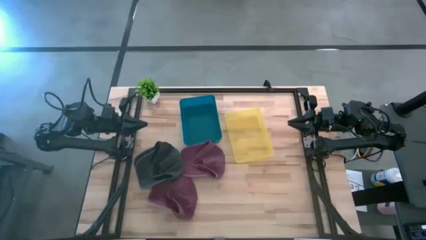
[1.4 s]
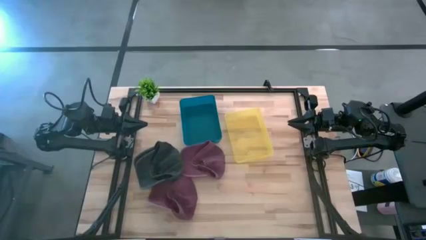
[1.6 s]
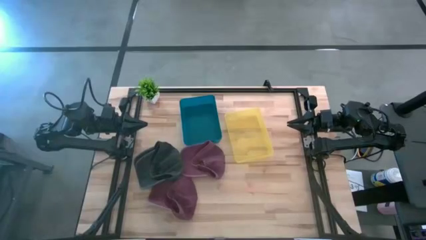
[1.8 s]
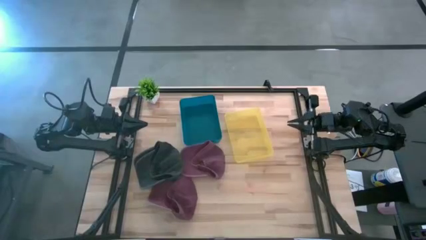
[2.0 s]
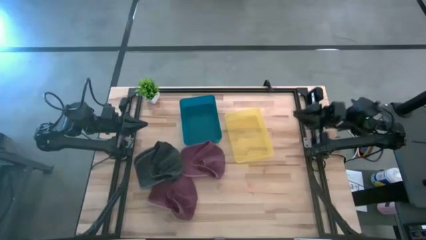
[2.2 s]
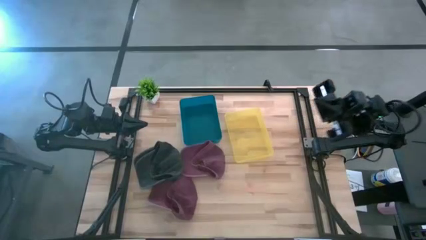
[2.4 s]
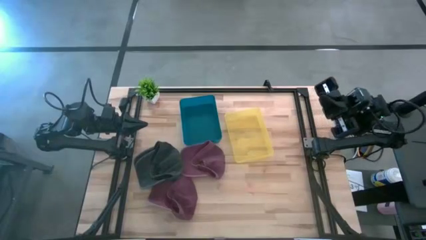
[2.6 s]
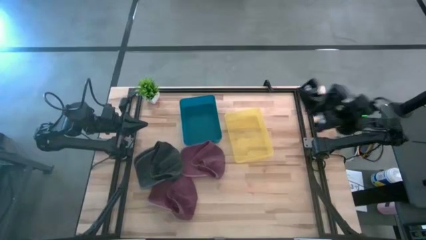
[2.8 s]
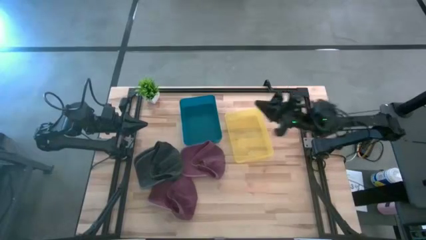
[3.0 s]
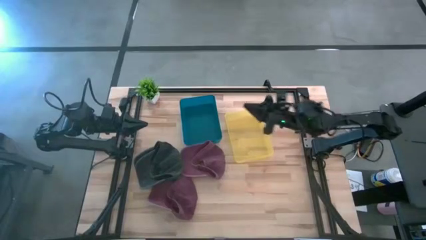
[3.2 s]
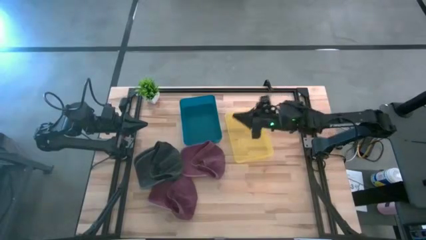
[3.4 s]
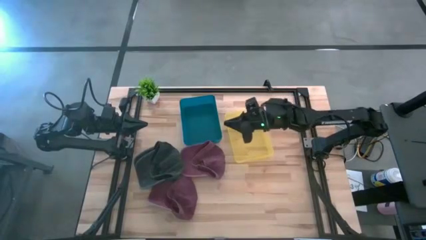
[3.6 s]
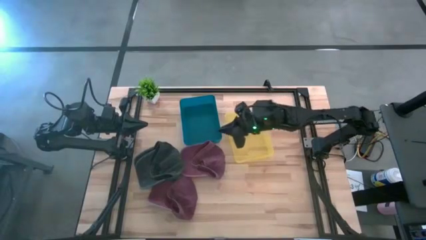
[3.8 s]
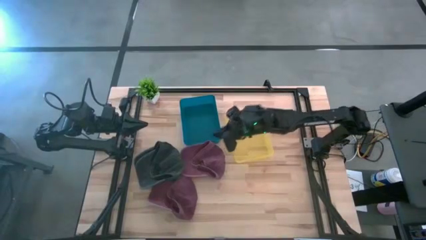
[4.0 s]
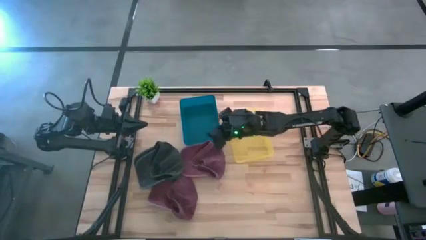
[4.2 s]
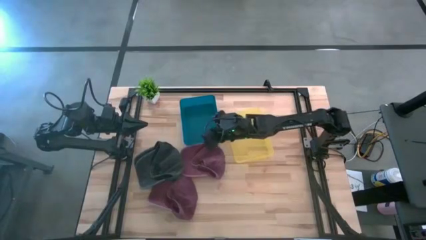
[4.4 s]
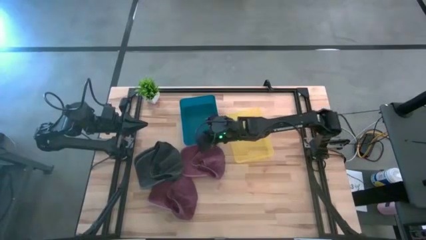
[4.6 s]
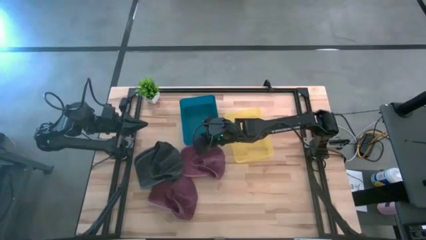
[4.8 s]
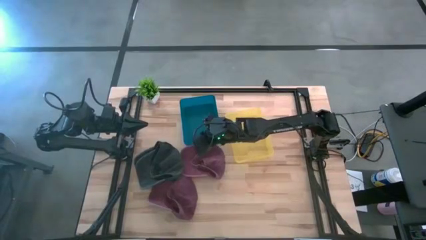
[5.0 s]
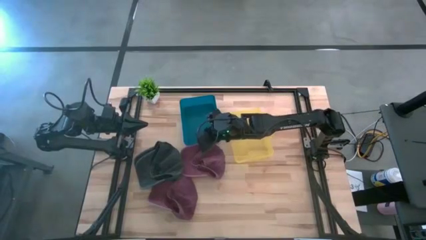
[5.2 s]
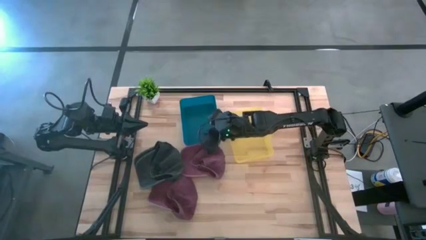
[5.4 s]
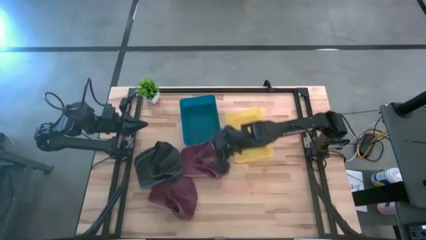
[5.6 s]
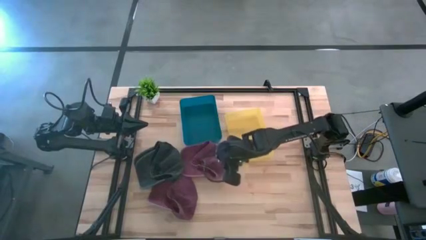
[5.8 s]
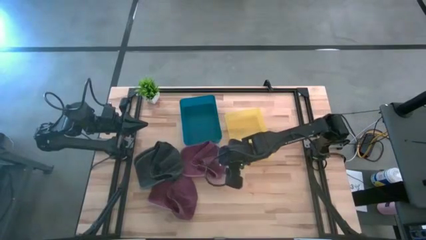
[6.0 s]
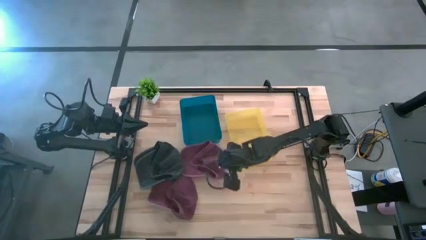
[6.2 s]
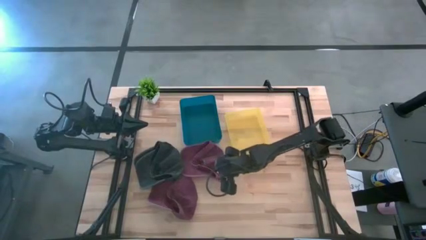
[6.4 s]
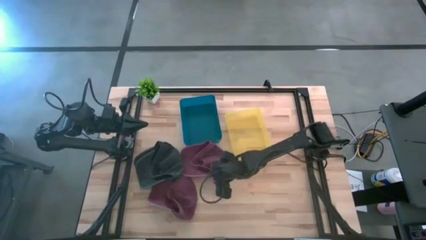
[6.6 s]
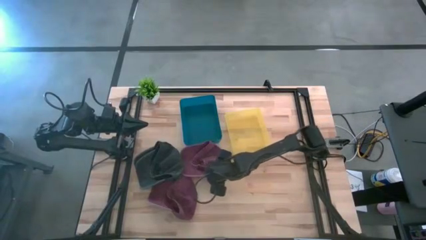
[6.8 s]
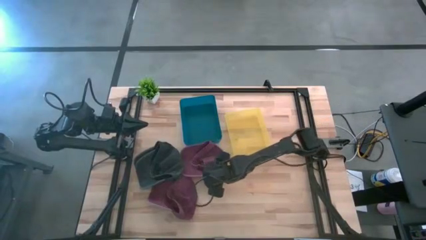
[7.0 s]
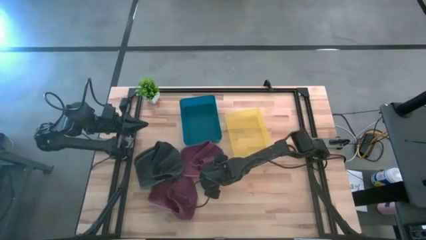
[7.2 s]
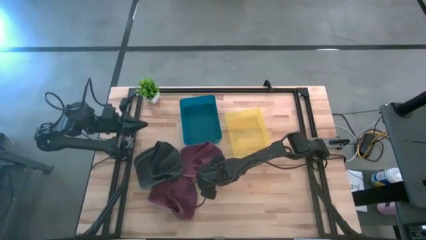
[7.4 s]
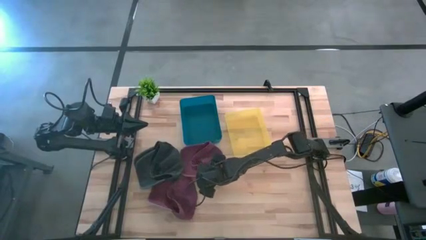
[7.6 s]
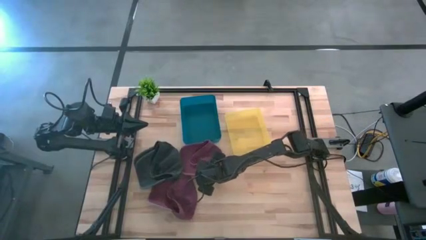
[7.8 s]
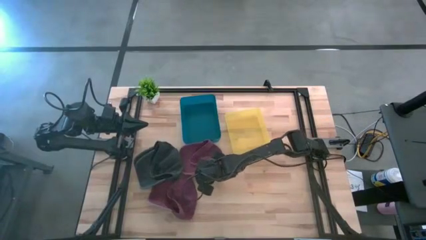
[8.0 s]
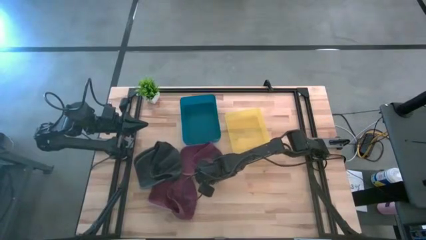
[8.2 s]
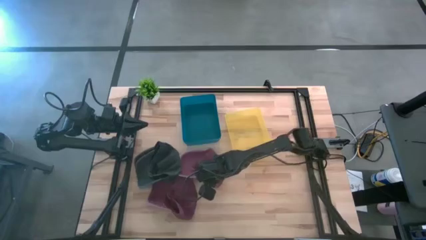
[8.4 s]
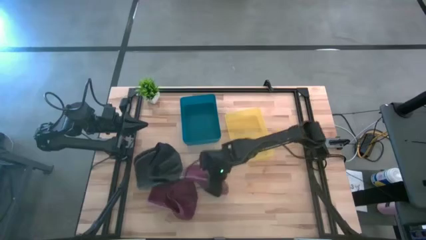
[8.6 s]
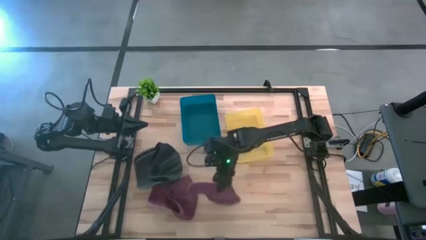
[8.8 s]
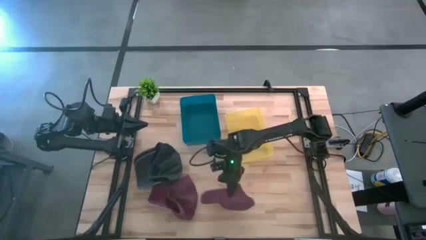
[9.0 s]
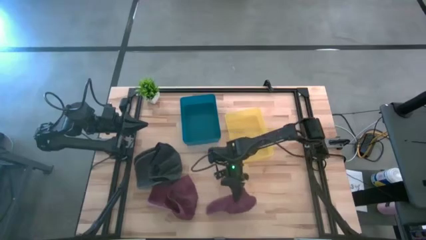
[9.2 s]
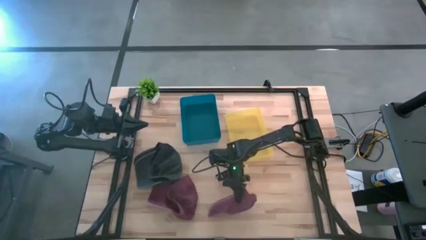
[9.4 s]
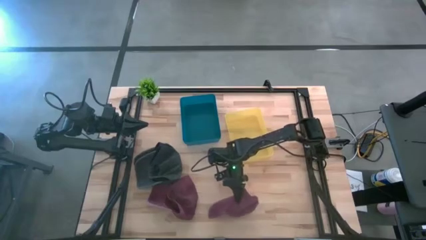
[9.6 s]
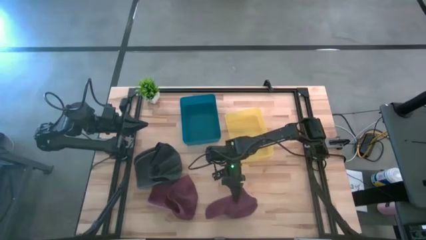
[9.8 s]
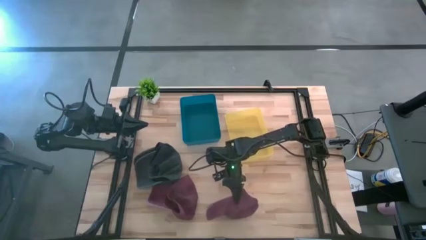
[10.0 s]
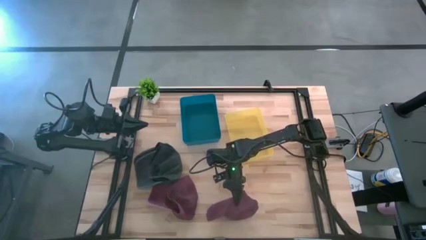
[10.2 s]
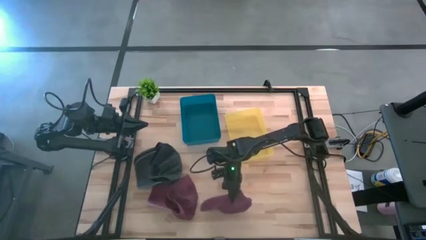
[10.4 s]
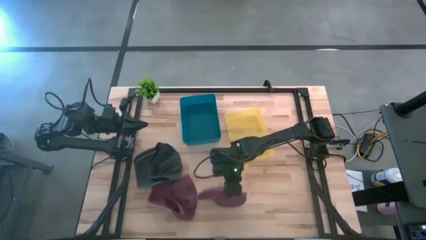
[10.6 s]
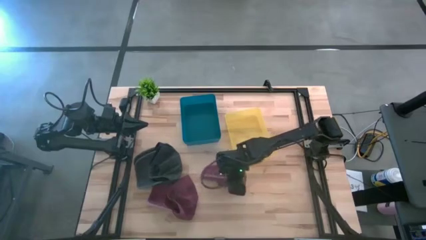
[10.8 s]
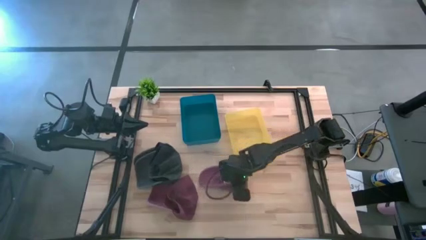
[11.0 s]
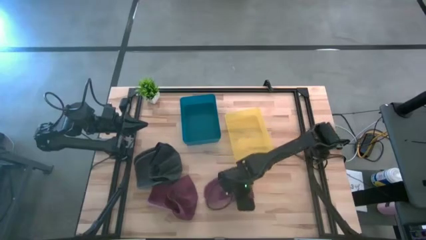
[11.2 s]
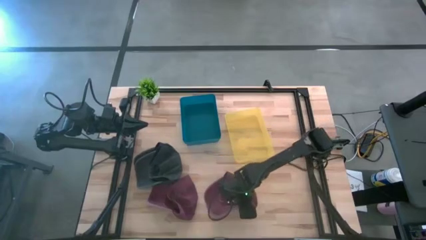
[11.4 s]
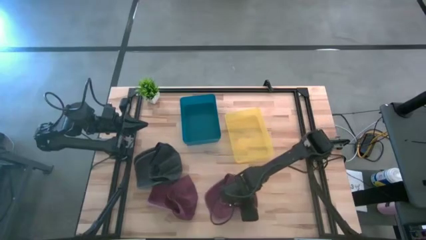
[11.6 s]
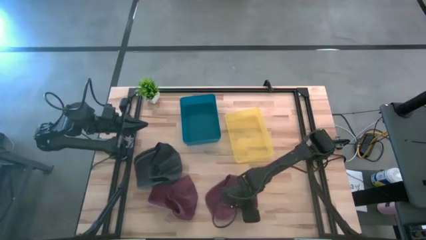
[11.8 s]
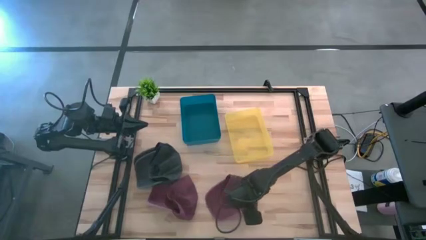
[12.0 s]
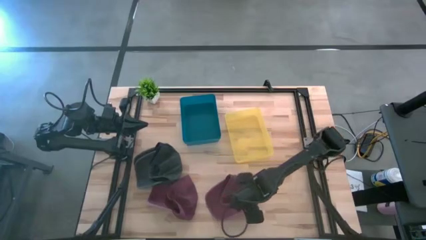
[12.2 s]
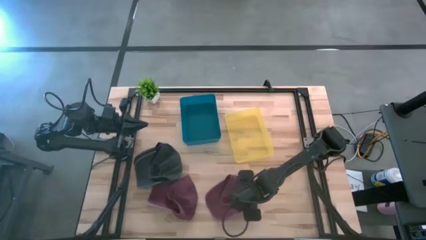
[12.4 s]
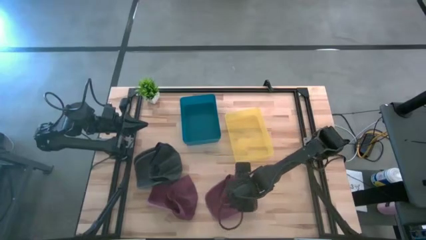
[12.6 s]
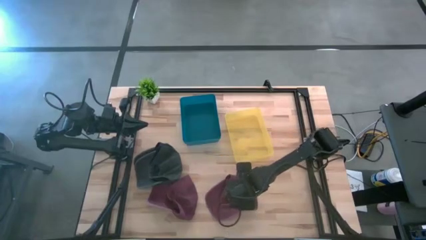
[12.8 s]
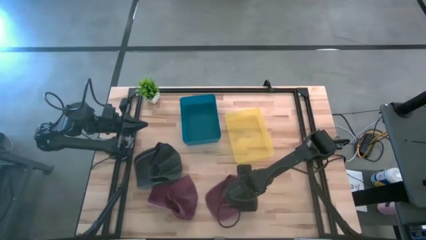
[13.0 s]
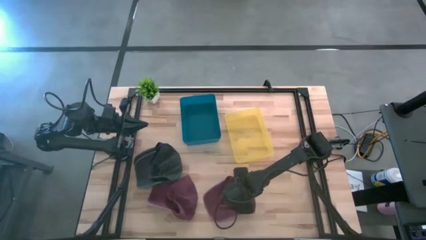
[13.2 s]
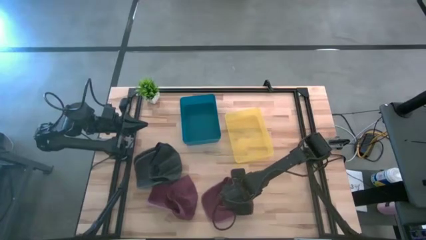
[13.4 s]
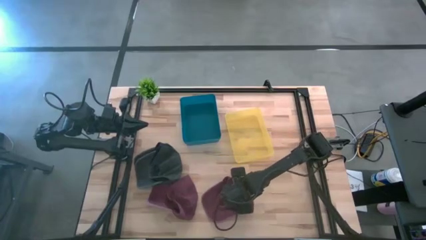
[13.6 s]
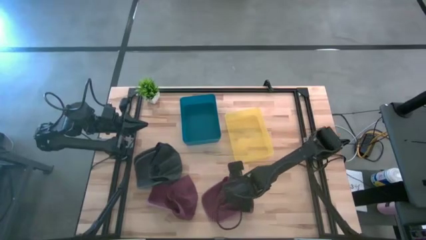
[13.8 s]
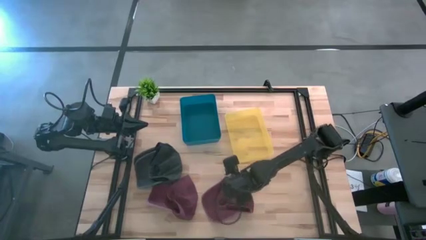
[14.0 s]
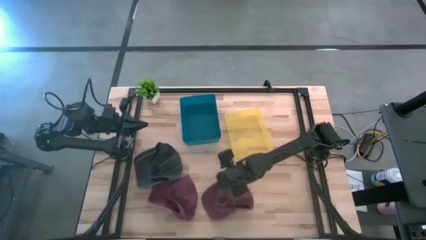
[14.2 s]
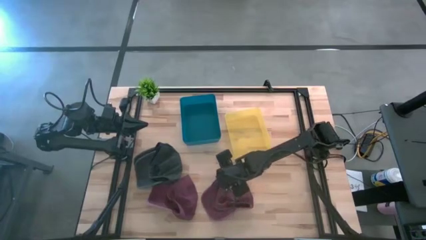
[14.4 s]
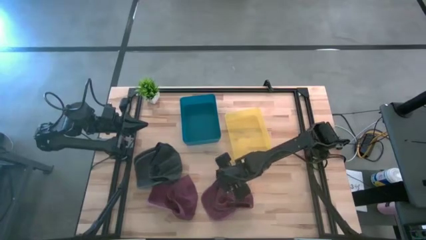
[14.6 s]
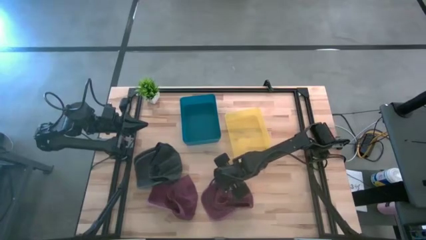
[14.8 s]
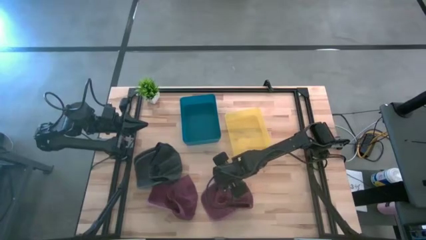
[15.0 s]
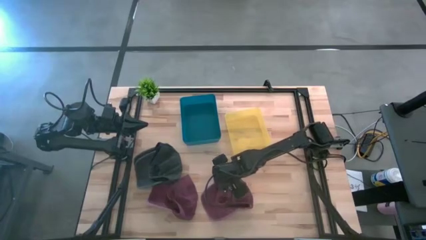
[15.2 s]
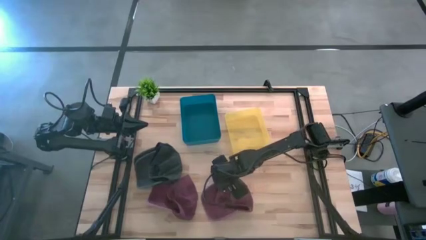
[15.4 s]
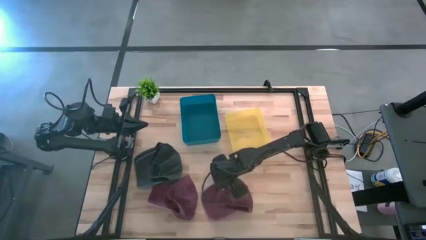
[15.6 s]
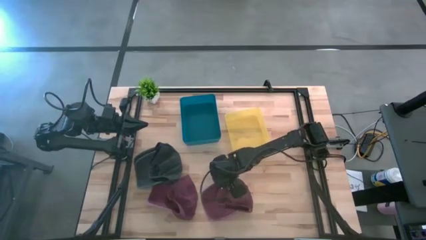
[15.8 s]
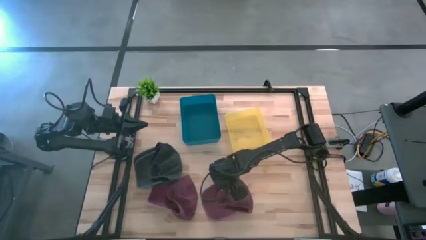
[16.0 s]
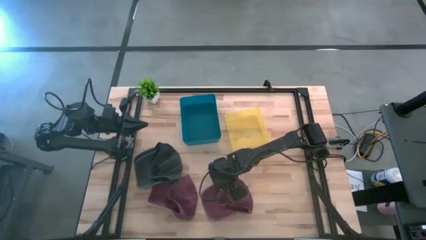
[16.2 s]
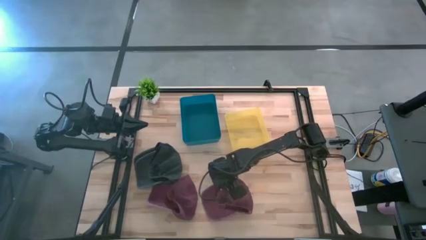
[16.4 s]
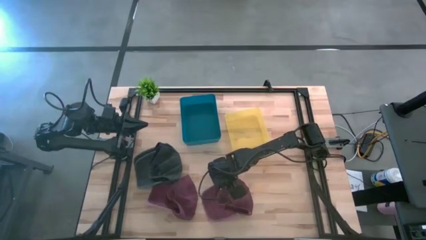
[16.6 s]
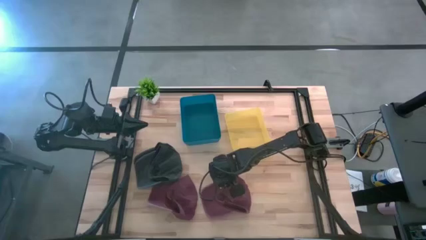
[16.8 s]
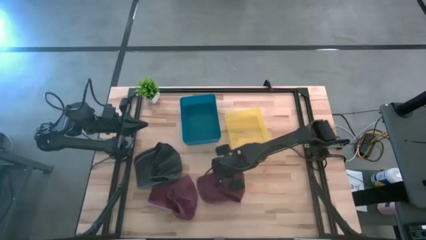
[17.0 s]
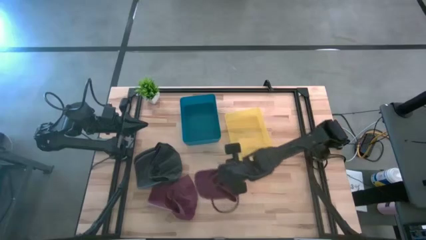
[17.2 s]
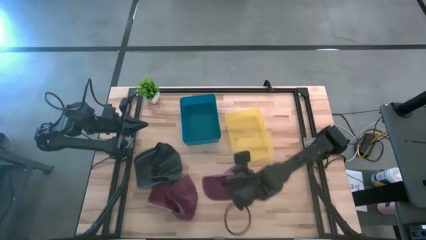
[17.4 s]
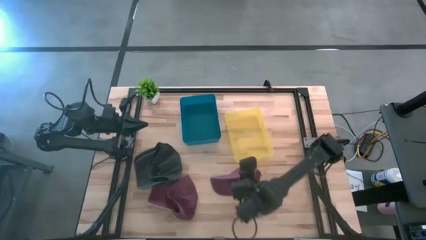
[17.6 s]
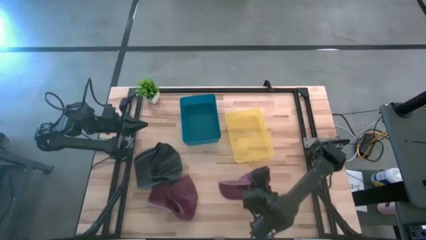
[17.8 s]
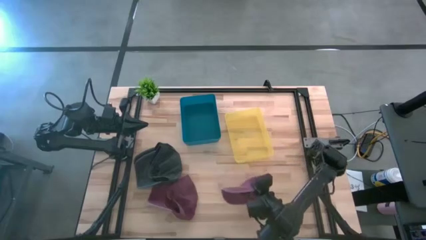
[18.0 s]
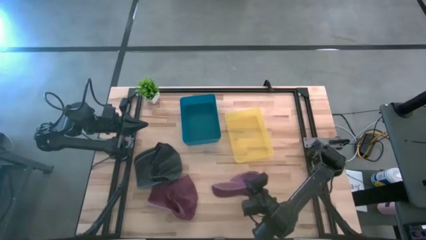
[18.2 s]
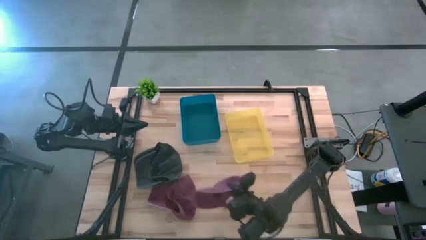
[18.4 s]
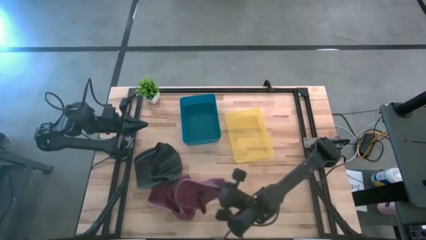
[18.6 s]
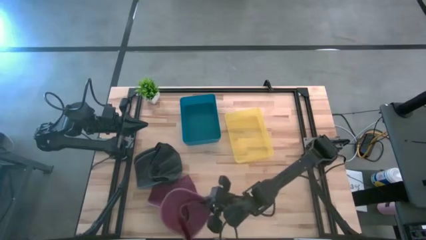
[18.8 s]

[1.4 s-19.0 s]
Task: Pick & Place hat
Put the top red cap into the yellow bin
